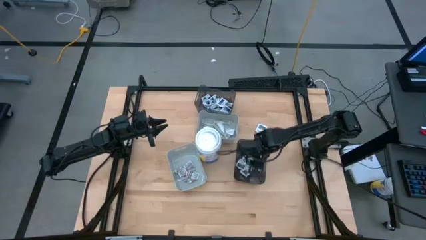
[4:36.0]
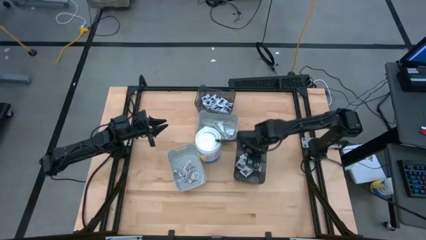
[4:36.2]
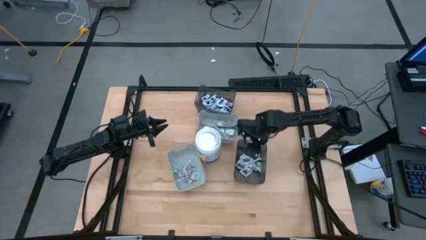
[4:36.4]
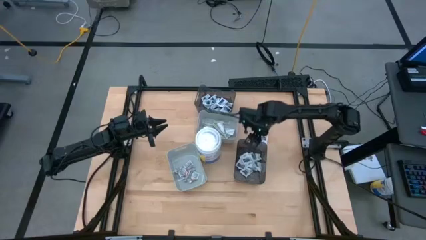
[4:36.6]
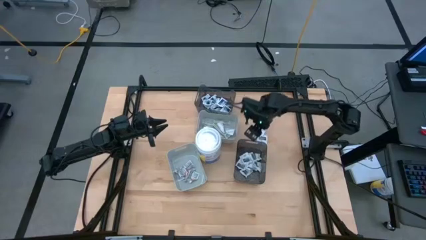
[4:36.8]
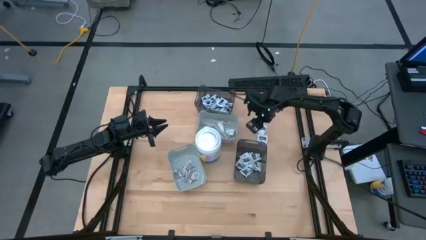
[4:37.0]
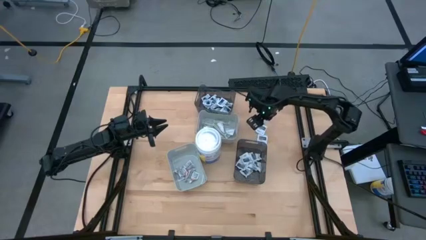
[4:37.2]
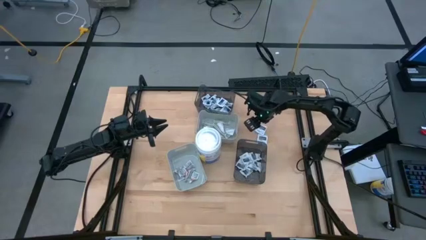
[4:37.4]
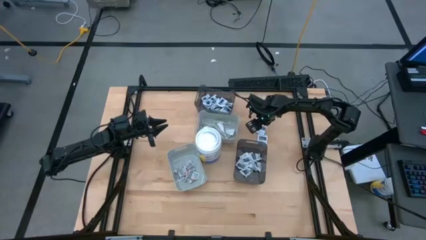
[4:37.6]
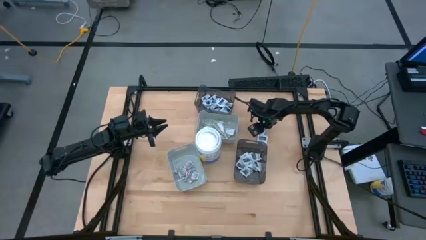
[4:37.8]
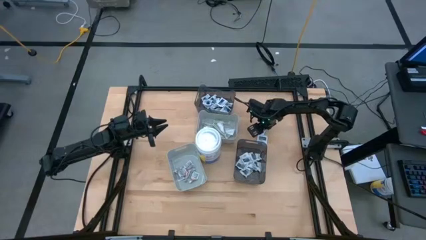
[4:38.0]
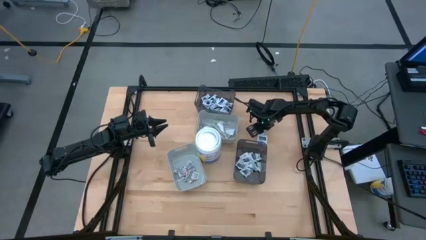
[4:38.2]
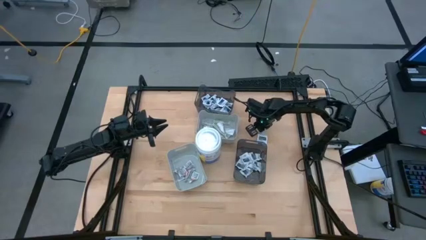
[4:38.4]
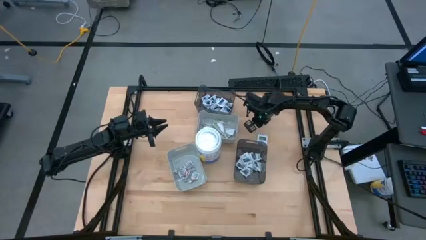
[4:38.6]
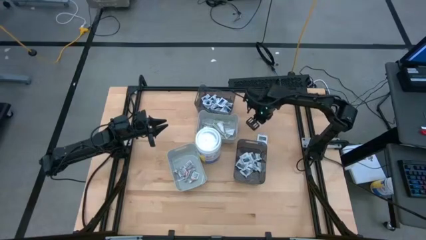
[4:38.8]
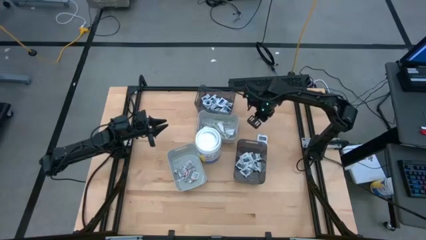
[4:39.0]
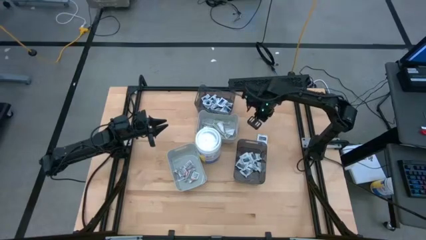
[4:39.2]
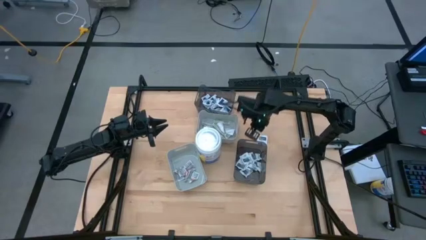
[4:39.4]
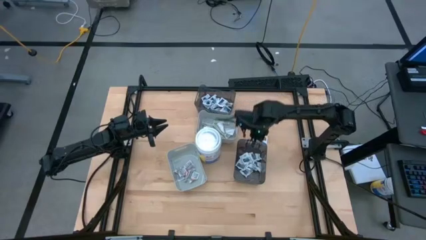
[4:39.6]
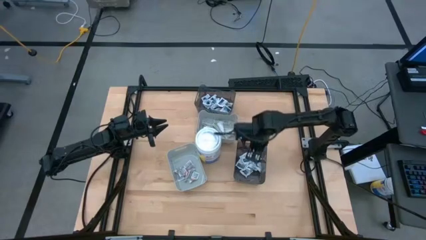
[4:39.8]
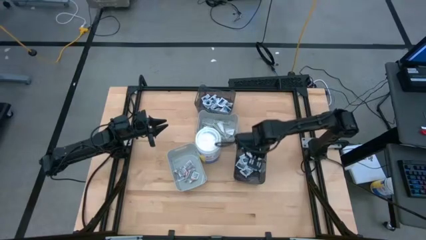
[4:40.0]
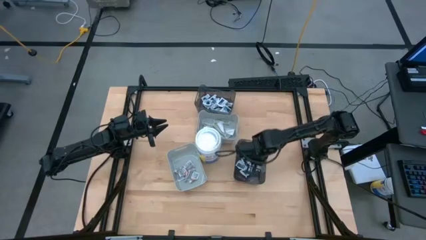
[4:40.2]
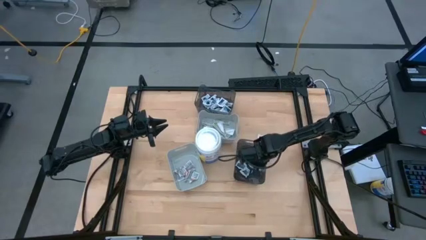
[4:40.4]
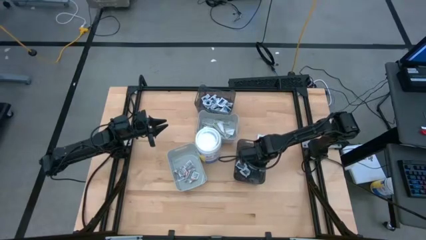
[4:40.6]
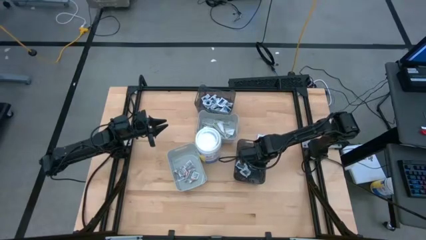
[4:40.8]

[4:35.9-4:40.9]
Task: Pick & Place First Aid Supplies
Put the towelette pack into the bottom transparent black bin

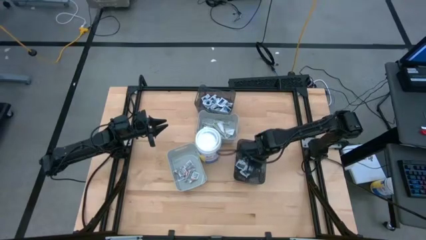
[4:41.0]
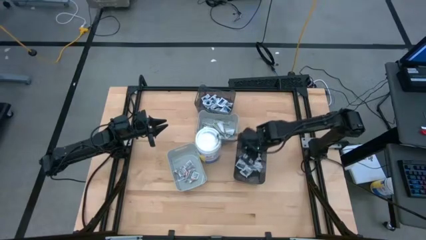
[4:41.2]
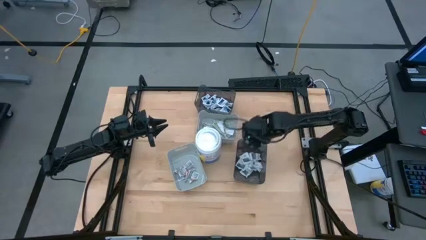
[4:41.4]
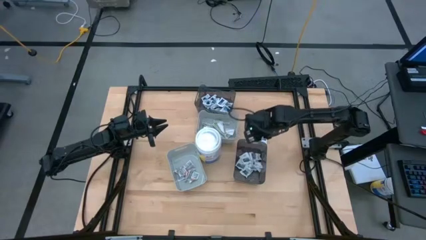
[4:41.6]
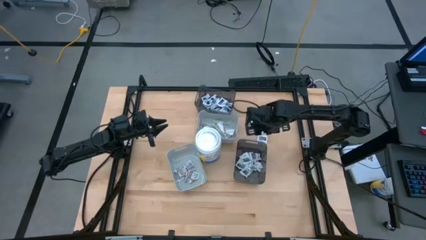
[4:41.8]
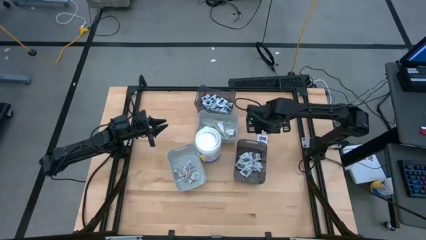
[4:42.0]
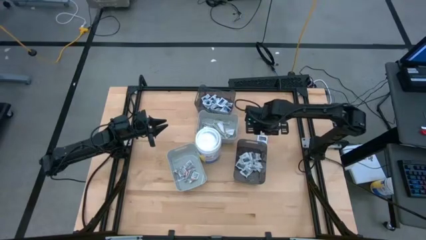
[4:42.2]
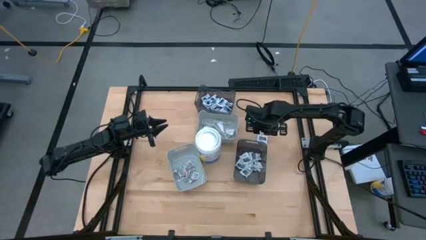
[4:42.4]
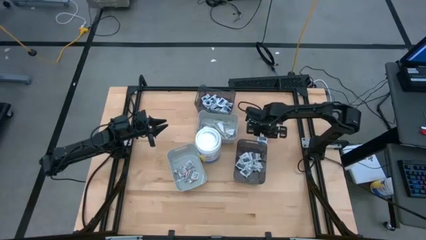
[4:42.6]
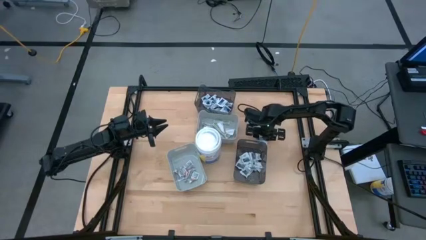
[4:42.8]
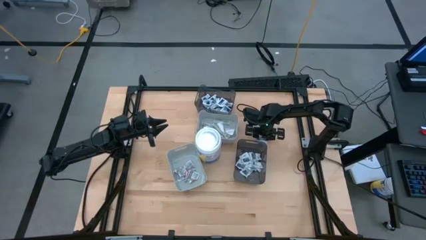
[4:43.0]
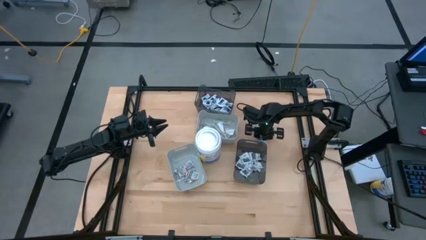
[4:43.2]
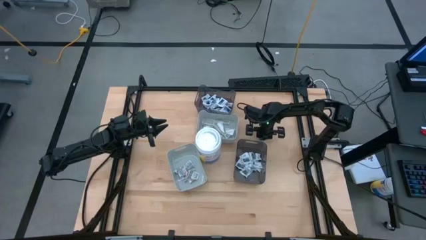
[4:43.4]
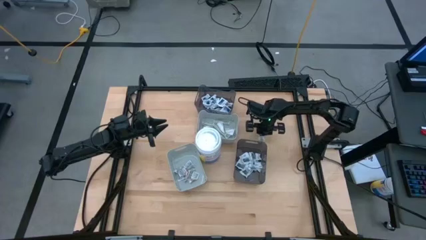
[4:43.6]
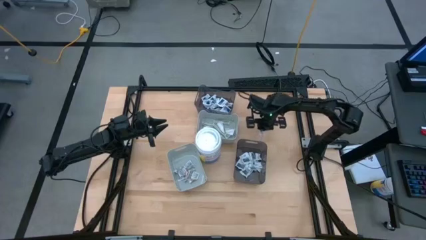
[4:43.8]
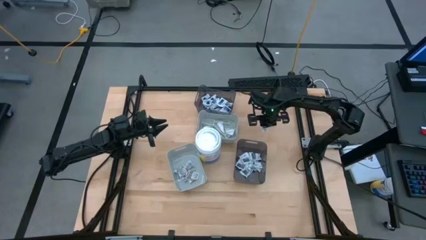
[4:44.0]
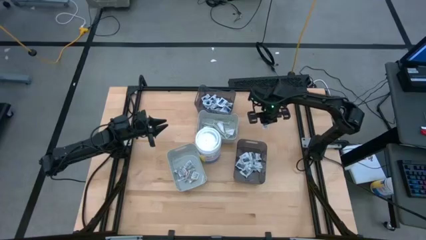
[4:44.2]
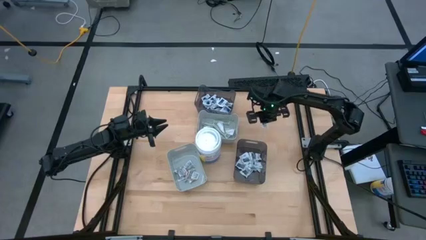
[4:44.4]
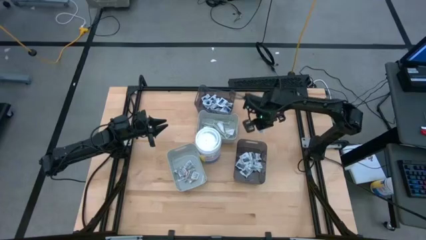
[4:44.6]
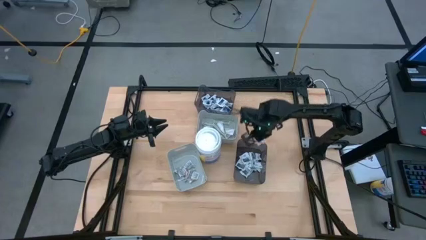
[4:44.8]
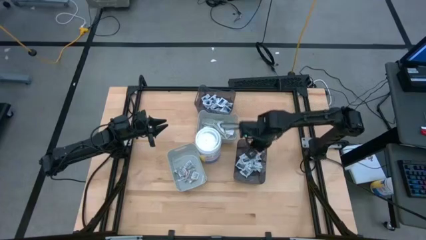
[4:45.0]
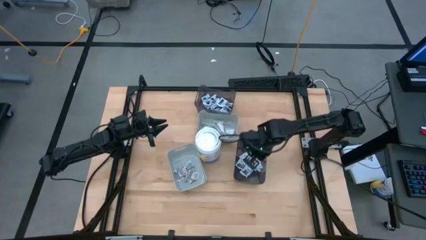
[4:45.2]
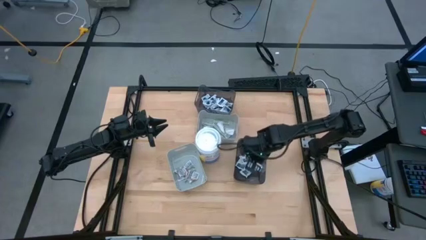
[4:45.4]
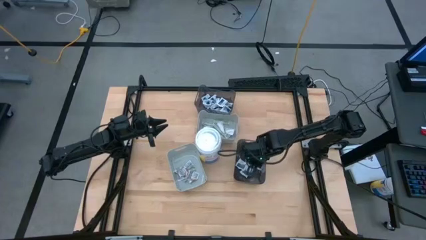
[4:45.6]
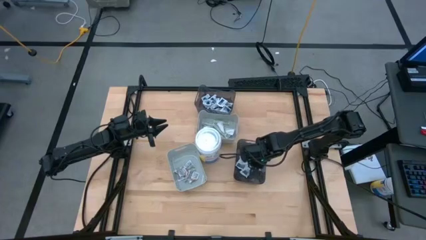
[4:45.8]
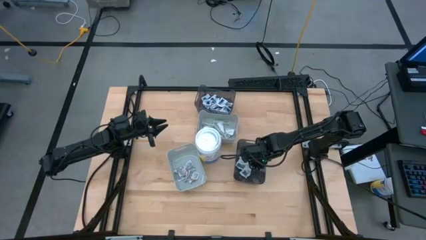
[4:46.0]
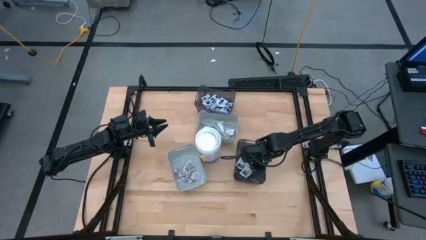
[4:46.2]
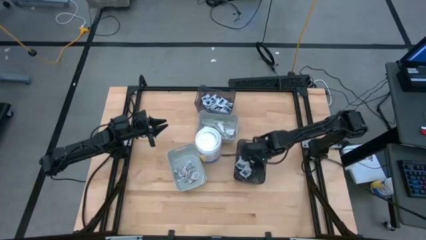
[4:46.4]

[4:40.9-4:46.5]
Put the towelette pack into the bottom transparent black bin

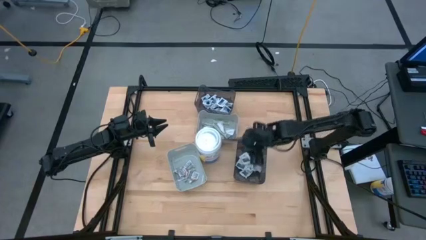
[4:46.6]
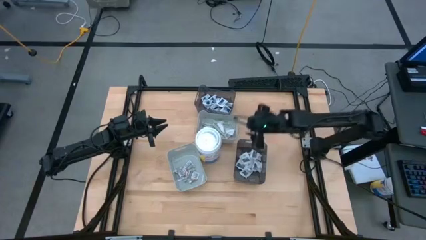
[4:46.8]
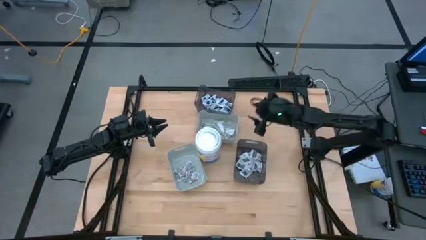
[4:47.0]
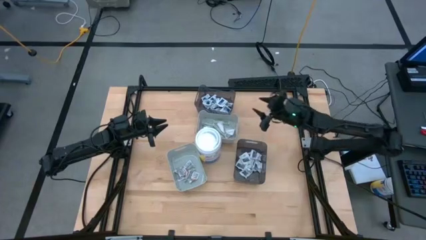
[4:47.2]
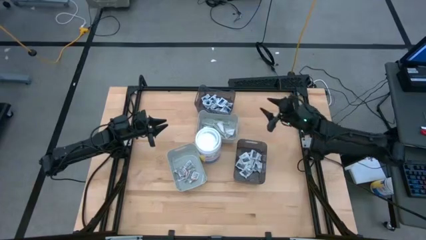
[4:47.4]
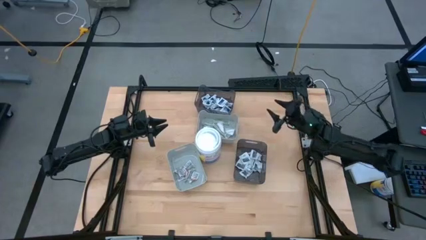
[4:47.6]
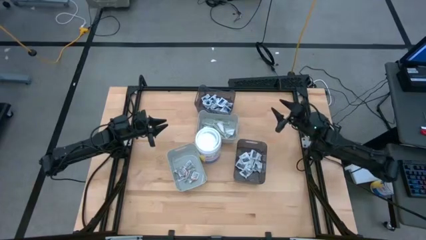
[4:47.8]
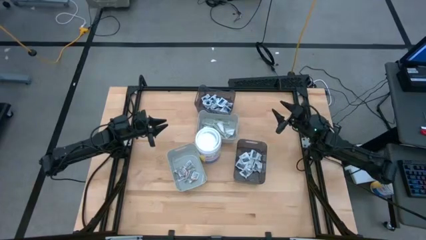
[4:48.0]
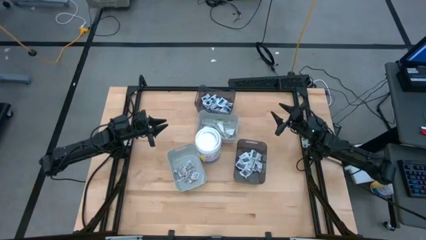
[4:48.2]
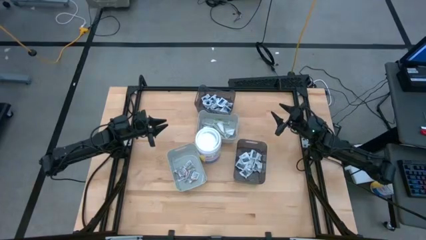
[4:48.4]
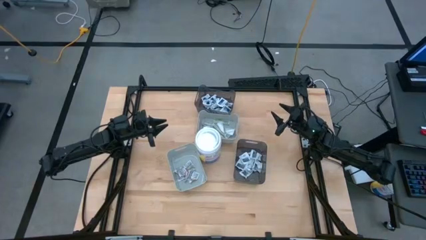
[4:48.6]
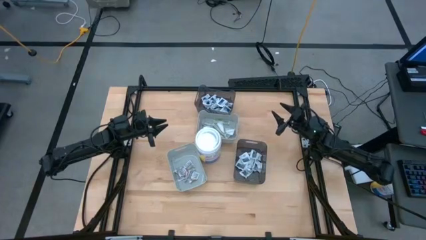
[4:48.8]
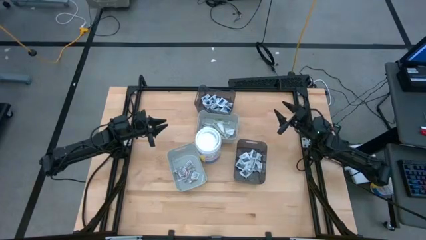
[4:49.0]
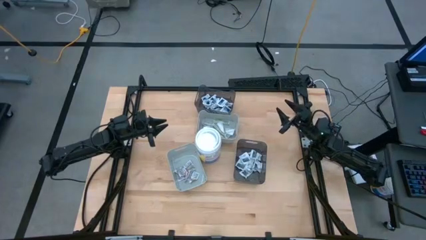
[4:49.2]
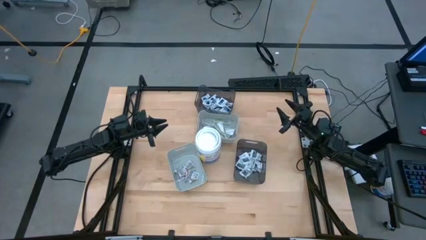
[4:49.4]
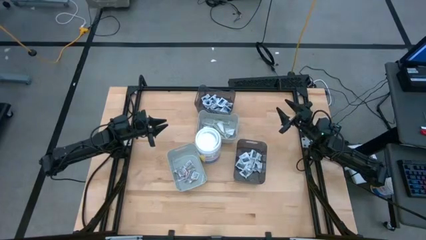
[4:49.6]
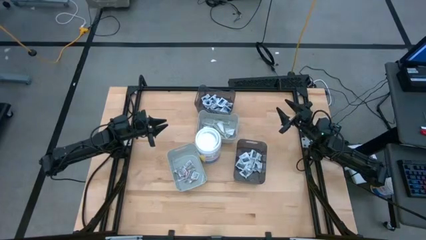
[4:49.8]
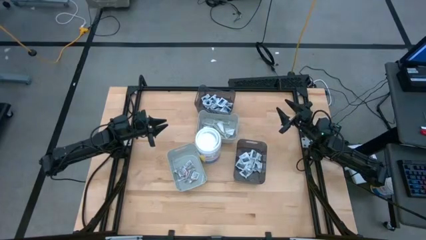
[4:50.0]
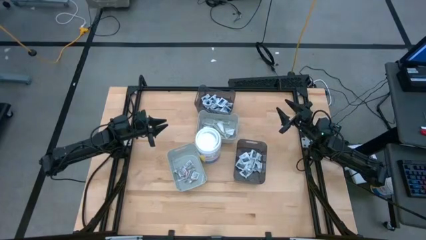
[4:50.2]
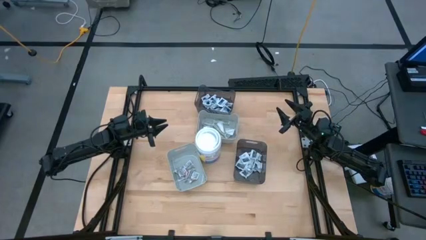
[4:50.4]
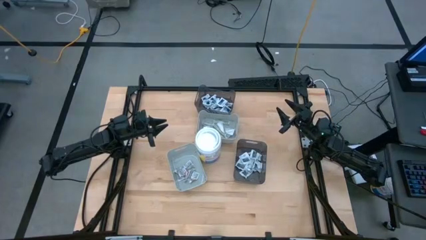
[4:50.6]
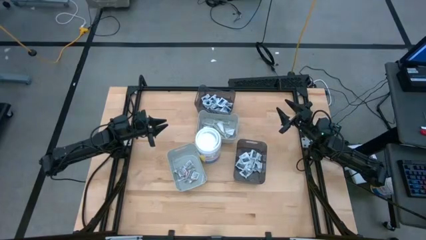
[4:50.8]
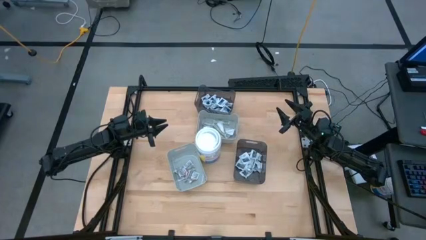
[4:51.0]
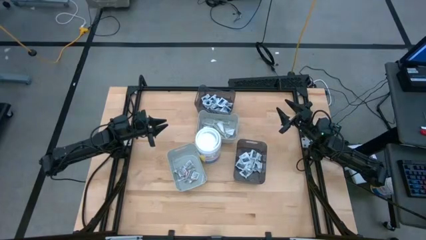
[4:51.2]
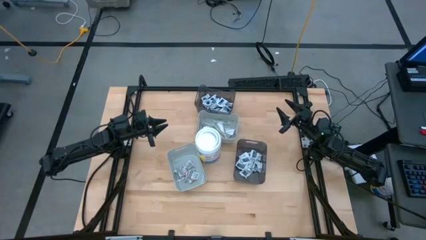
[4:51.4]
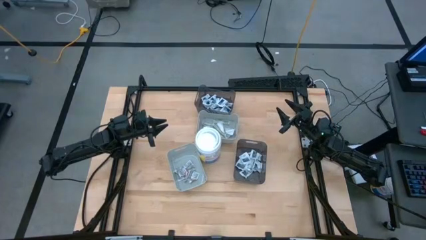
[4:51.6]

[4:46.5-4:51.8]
Return to Home Position
